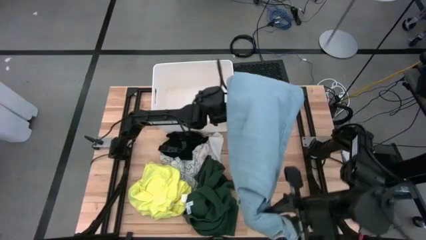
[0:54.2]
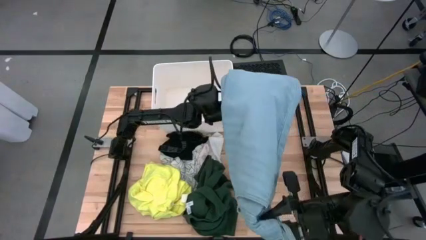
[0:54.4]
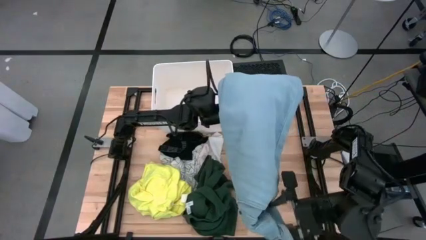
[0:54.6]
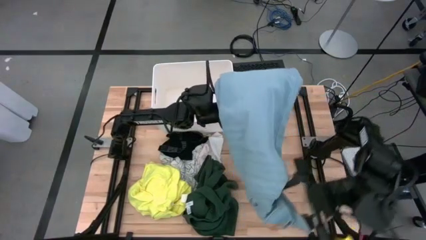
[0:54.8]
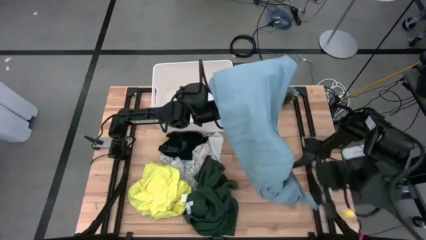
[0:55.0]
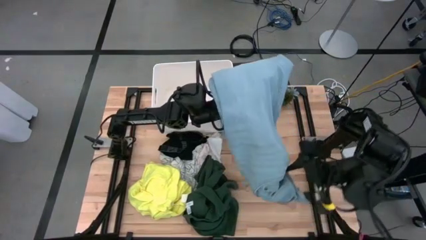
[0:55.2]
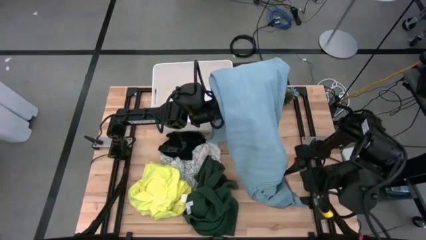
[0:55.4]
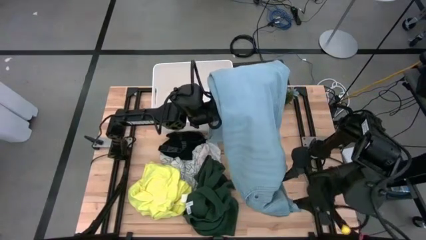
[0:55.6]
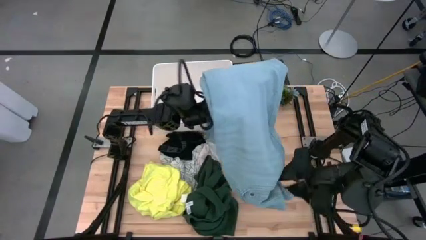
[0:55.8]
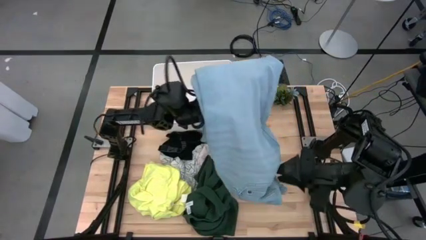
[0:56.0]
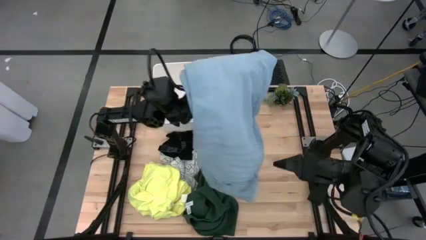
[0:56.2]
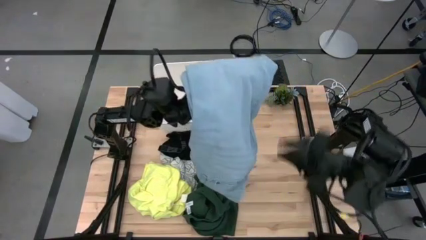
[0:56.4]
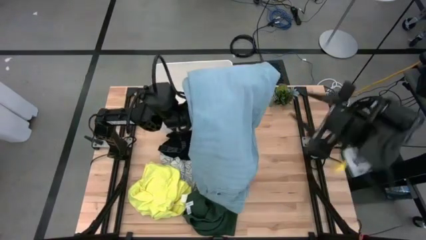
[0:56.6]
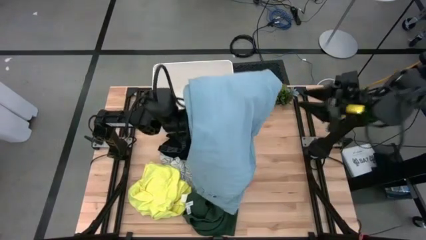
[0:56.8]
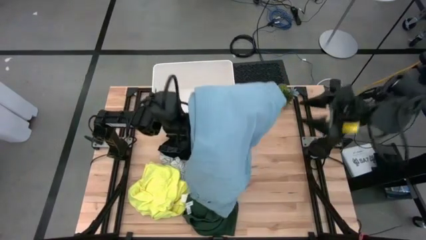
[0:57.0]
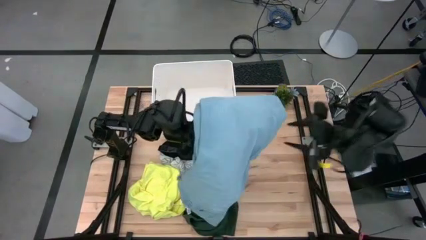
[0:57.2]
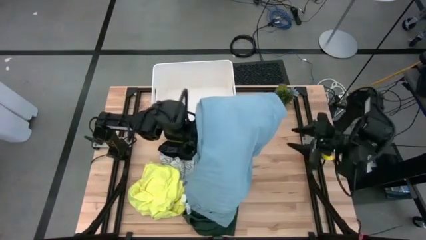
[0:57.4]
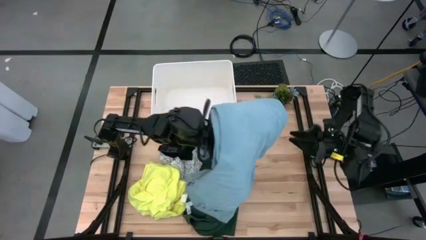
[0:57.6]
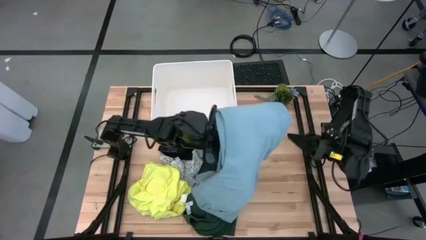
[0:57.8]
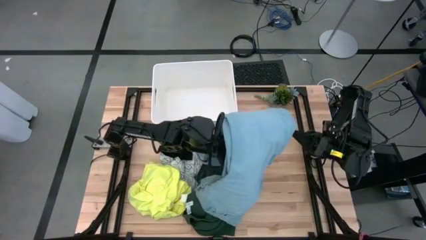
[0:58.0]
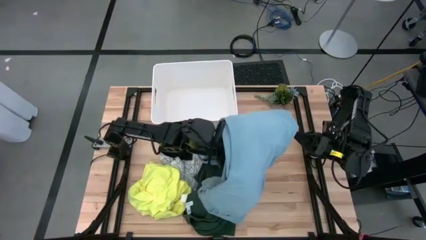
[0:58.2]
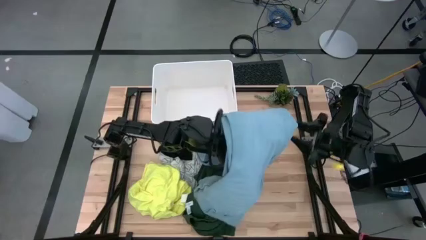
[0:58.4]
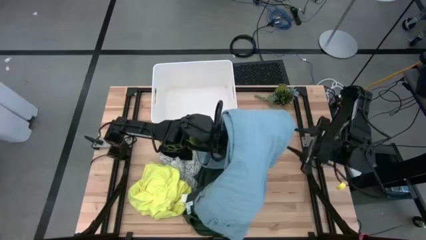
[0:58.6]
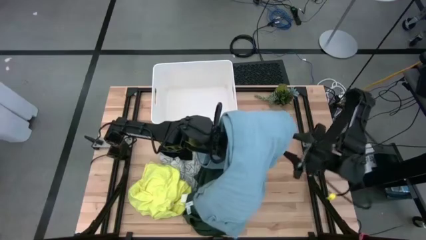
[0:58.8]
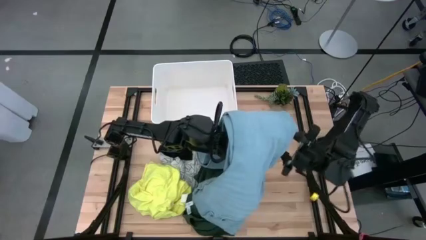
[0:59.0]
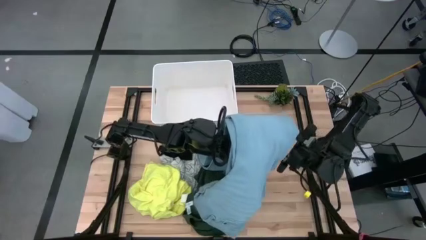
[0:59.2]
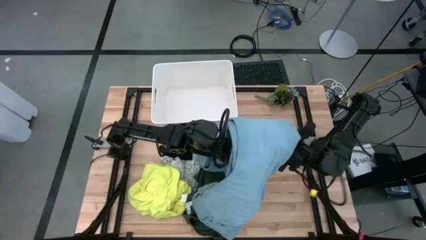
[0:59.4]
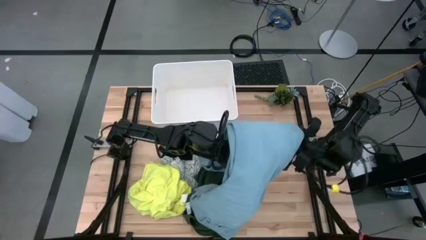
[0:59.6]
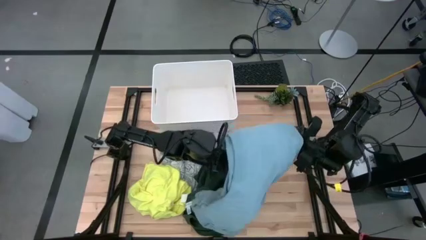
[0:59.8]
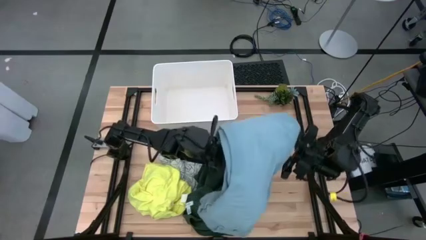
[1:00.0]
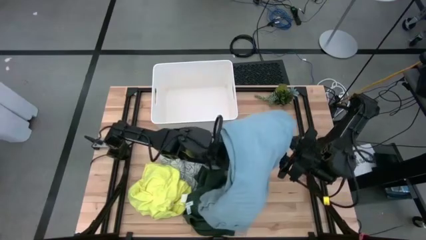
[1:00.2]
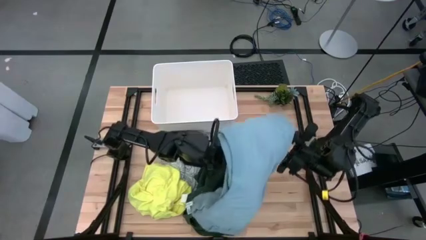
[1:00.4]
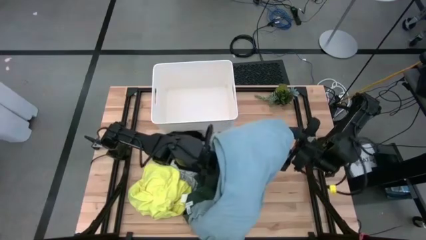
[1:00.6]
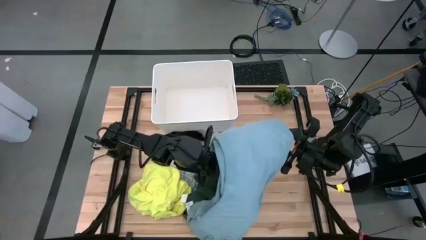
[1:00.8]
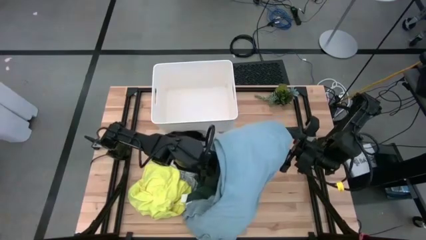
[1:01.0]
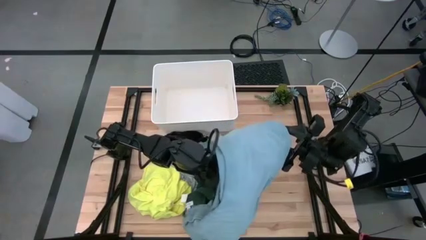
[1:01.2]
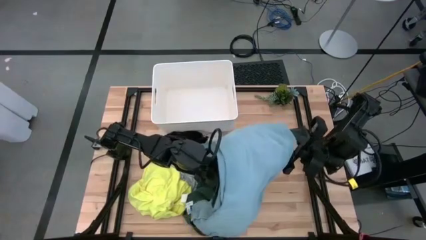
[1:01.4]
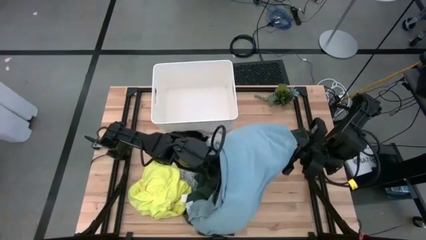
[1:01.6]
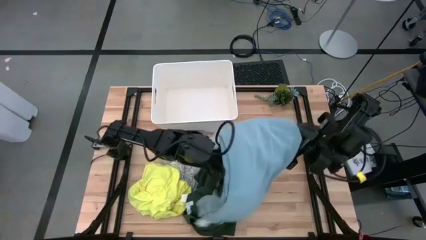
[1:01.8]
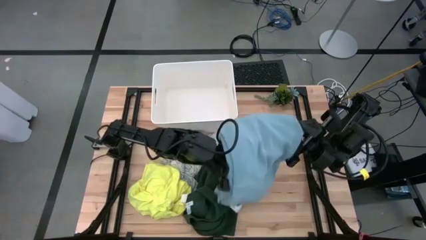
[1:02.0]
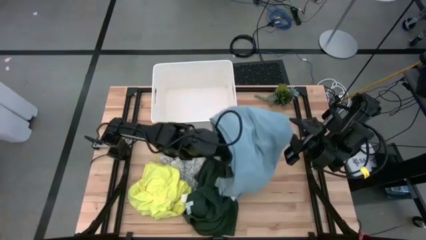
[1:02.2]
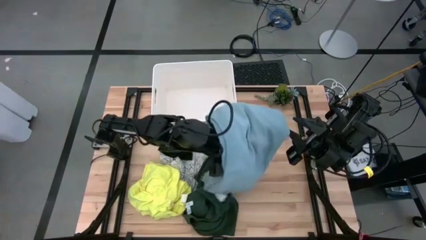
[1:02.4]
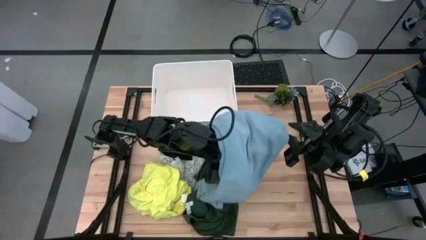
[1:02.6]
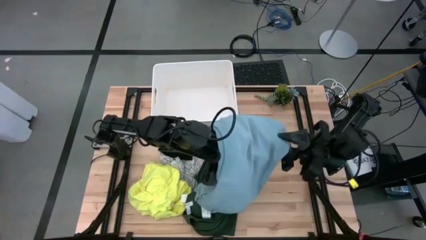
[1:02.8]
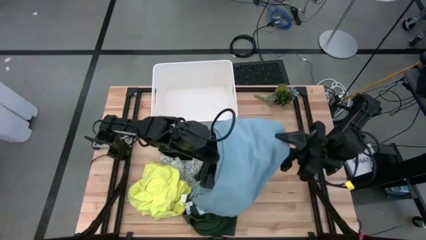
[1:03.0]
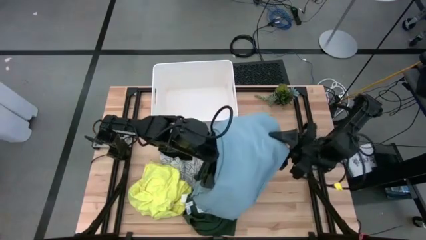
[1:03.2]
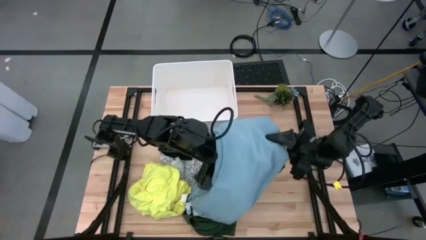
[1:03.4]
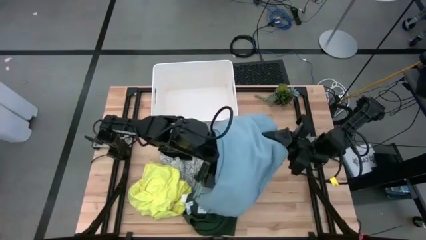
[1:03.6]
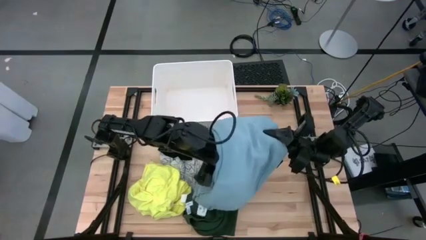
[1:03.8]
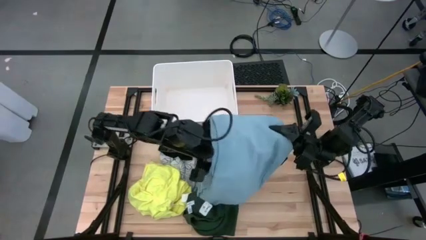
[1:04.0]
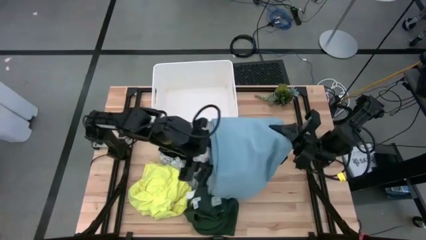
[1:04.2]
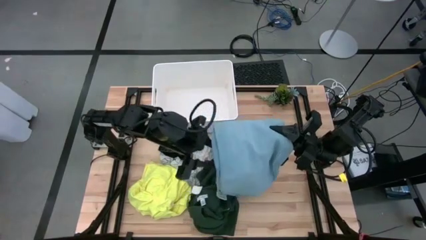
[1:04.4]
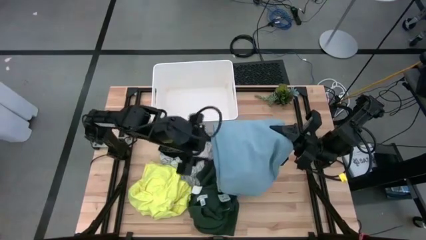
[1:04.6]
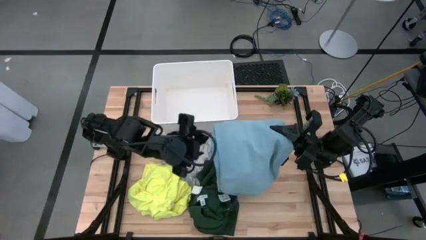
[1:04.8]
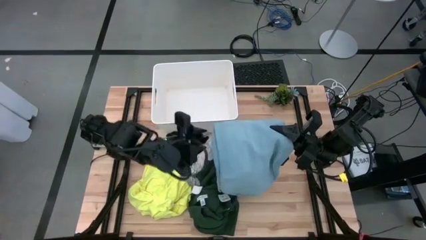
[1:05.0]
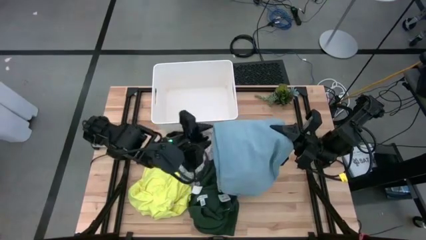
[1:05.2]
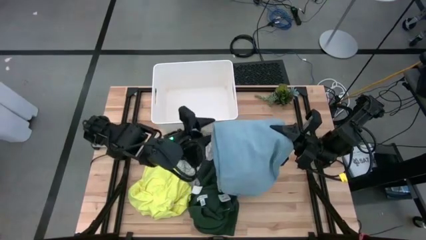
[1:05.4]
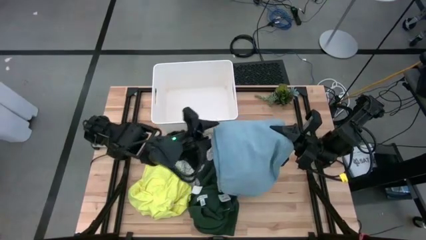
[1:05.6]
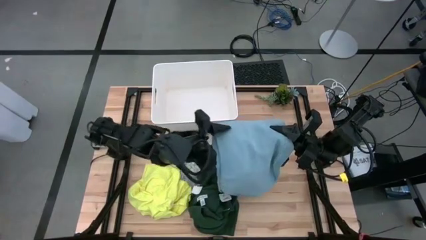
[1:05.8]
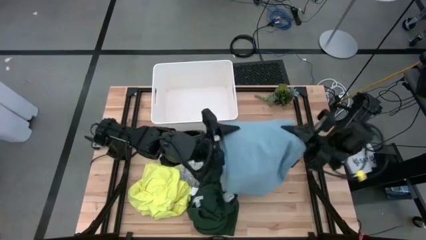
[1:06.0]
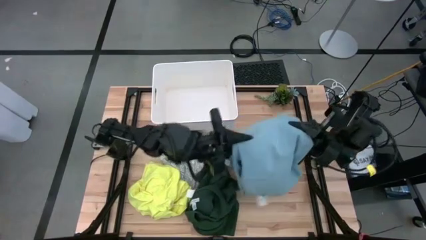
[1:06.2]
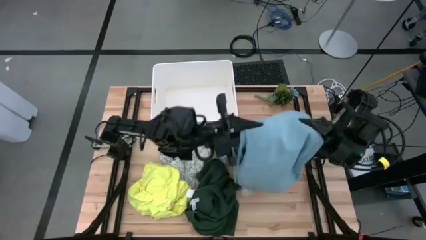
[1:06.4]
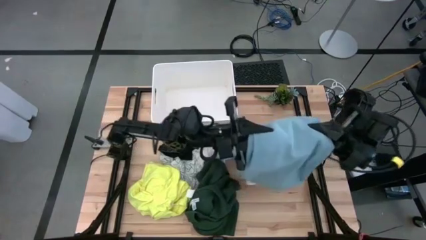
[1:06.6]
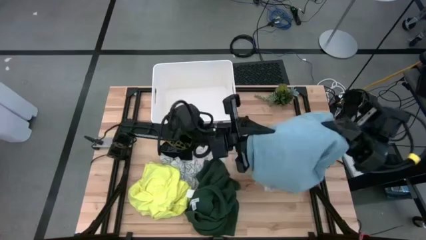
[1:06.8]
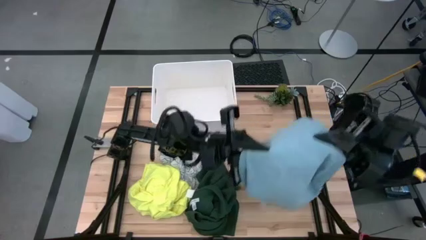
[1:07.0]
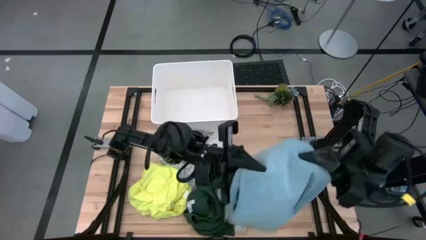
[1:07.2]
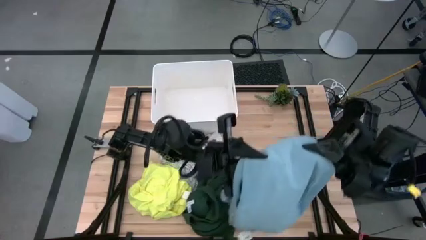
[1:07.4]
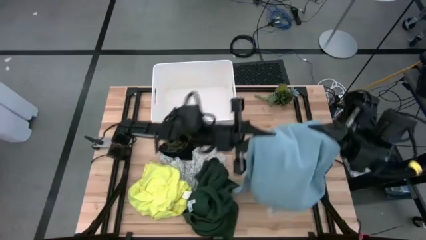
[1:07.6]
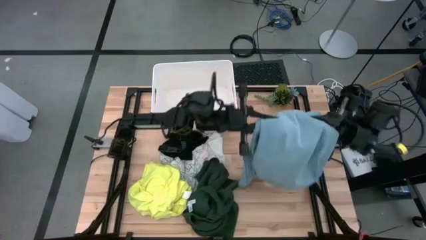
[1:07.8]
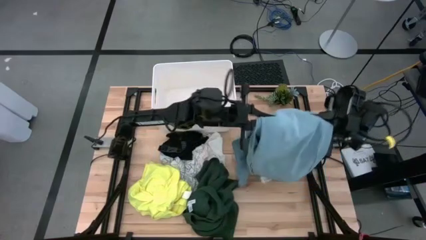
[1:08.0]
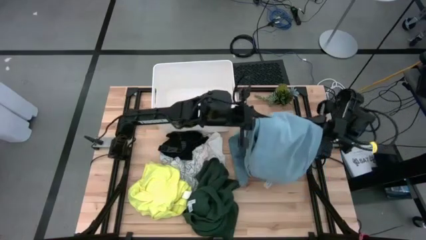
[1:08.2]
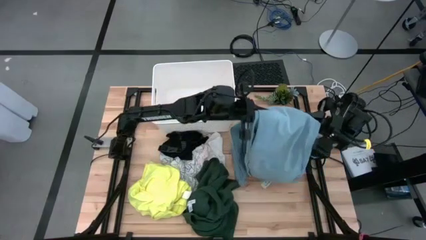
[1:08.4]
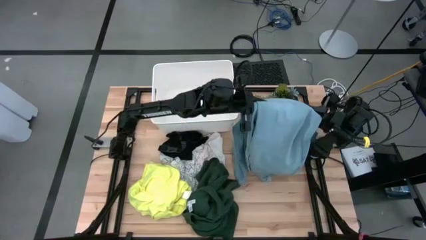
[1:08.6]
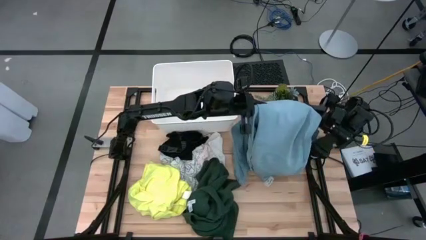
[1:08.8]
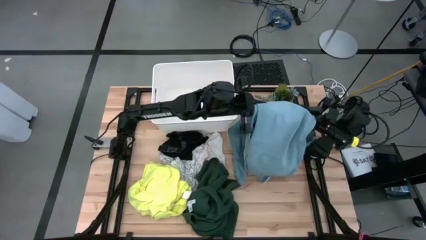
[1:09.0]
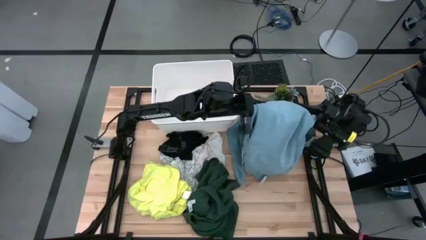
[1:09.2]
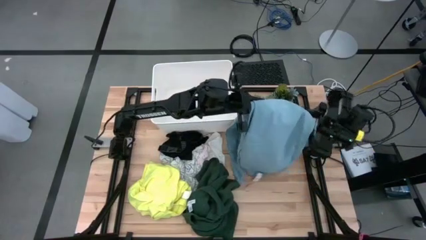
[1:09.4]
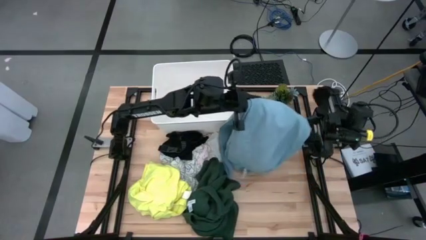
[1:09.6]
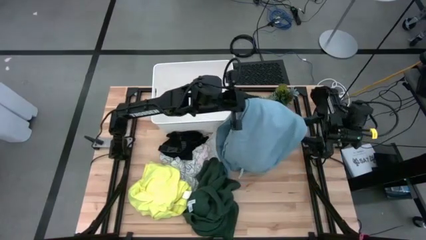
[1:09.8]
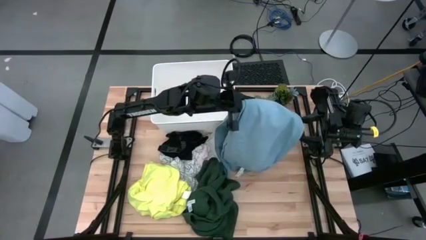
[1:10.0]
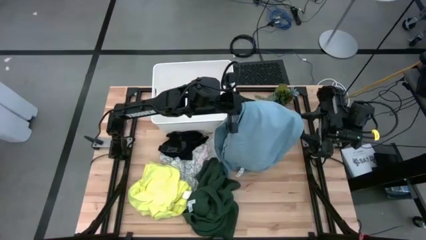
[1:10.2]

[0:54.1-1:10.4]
Task: Fold laundry
Fold the denim pants
